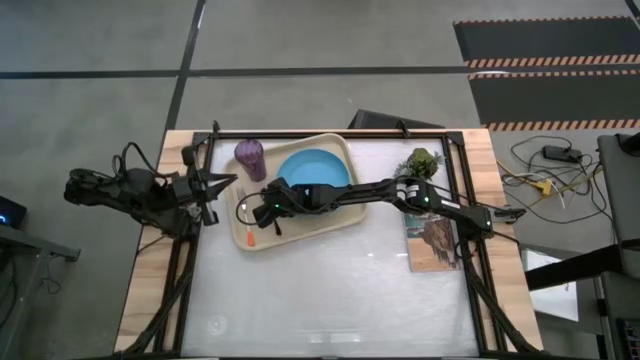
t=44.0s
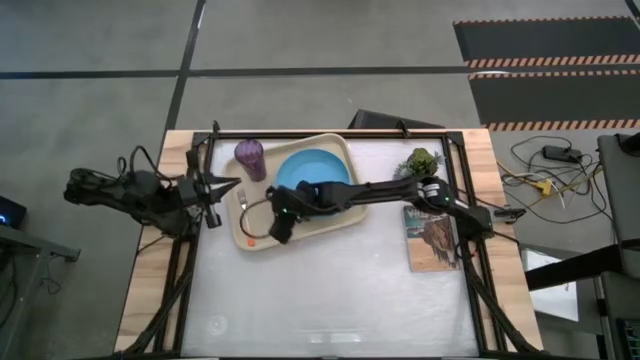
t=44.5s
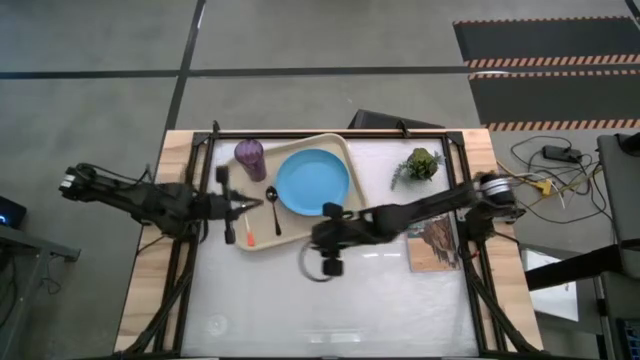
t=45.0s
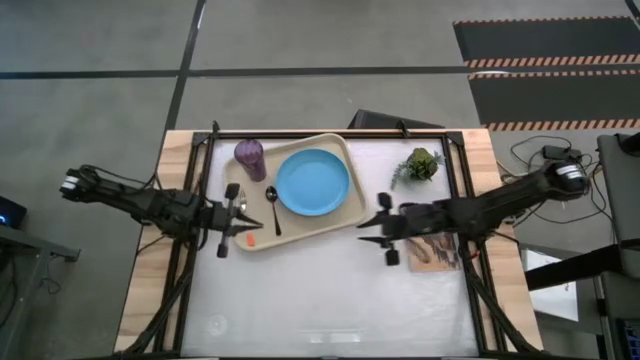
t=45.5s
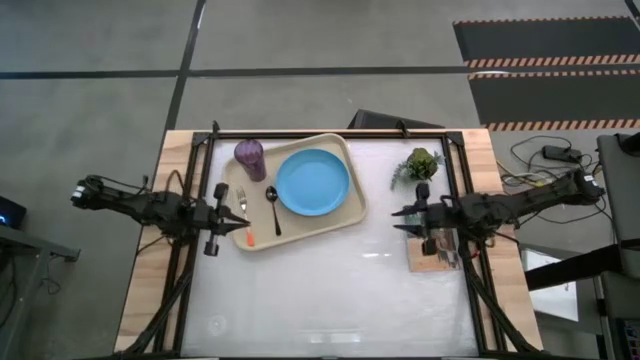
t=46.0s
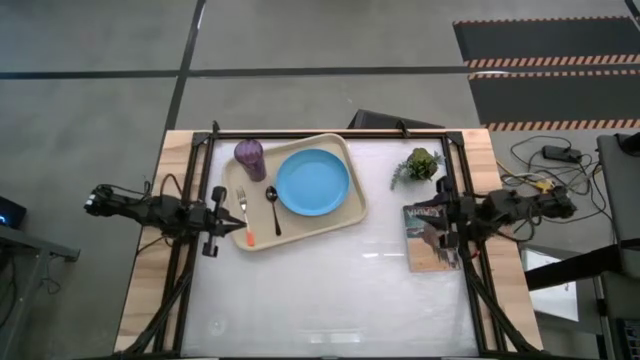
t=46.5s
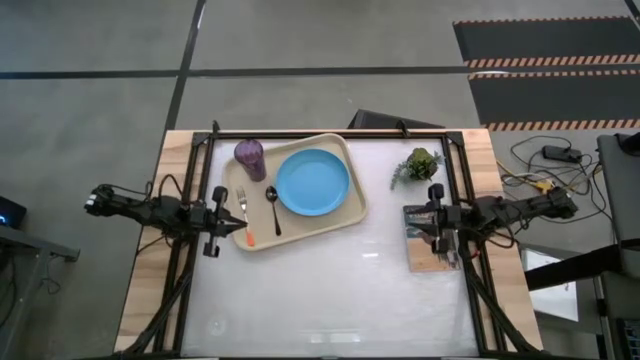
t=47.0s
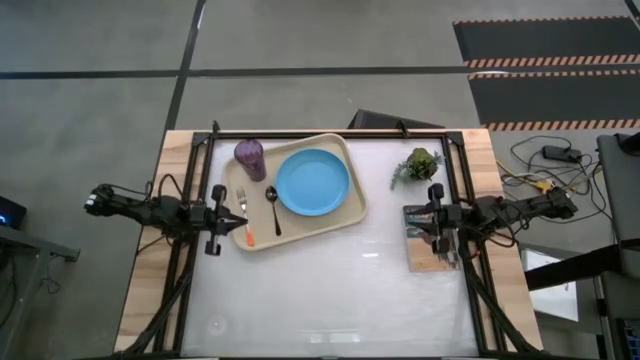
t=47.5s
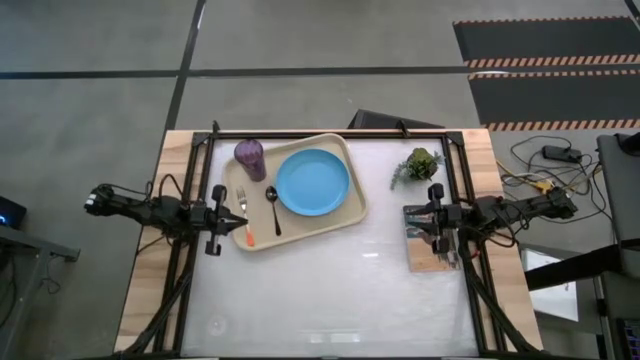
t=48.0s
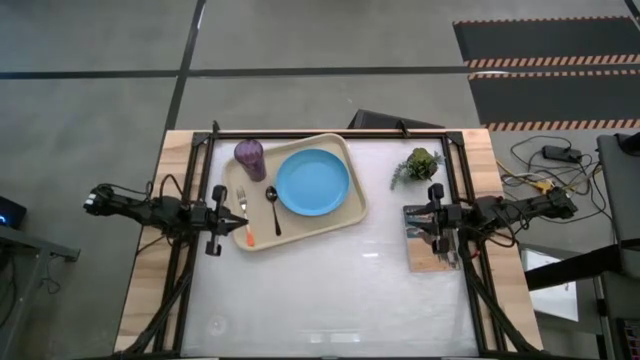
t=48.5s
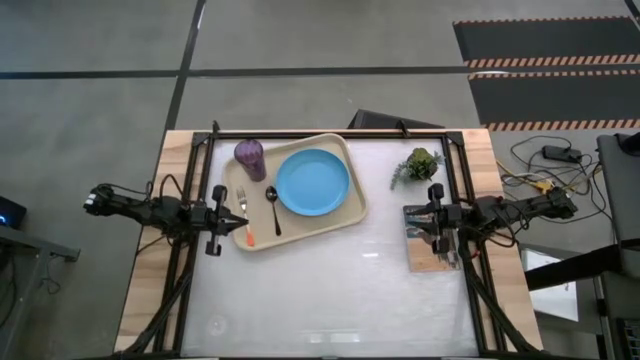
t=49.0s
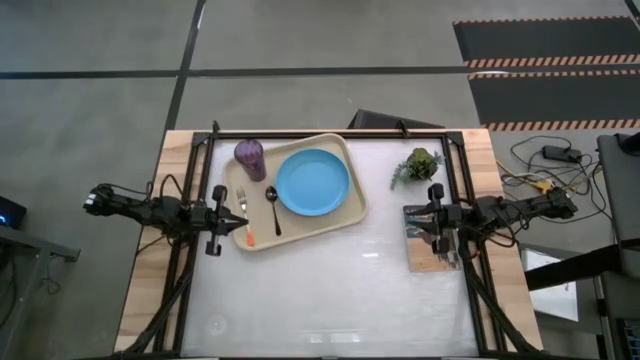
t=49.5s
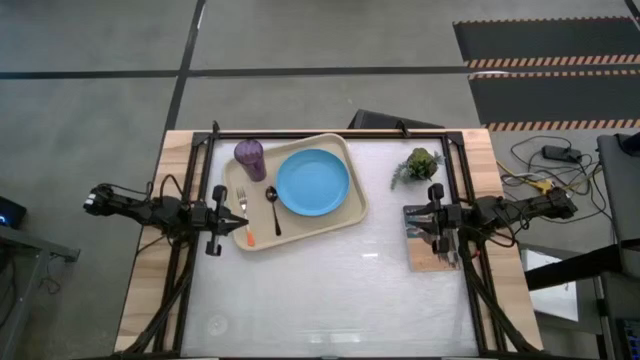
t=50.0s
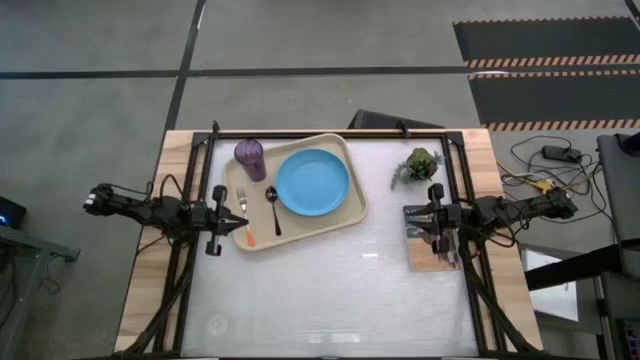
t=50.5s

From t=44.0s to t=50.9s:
Task: Pick and place plate/cup/fork/spoon on tray
Return to Home Position

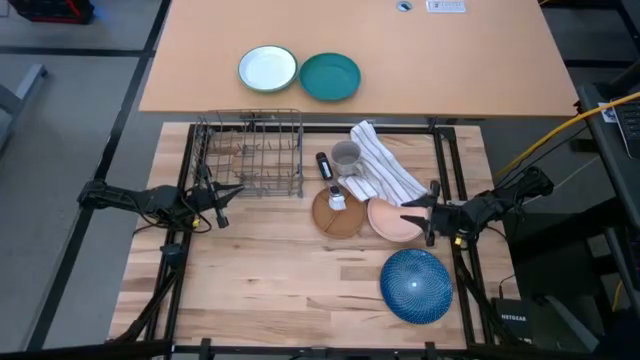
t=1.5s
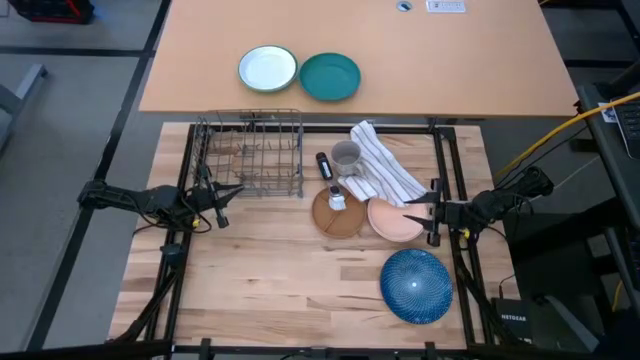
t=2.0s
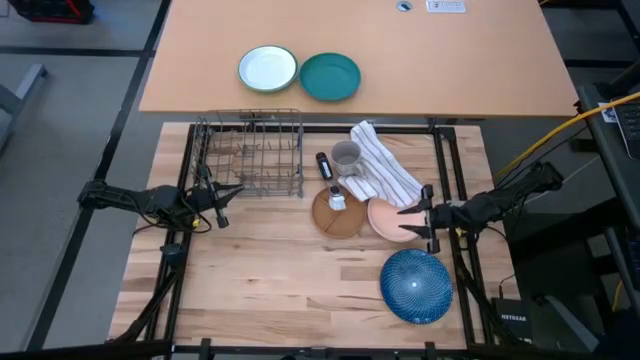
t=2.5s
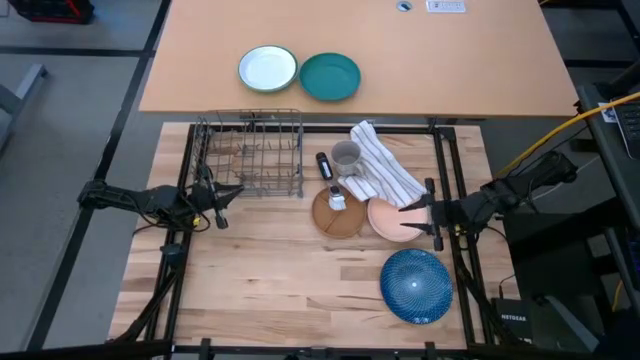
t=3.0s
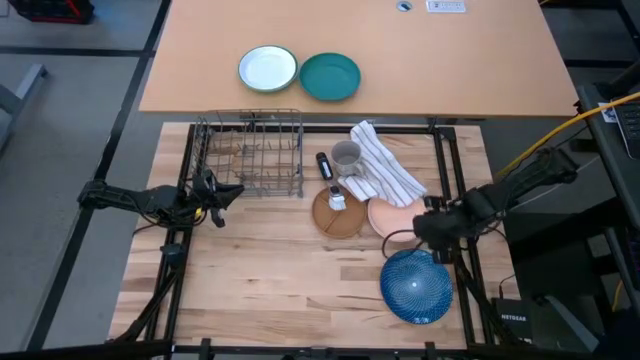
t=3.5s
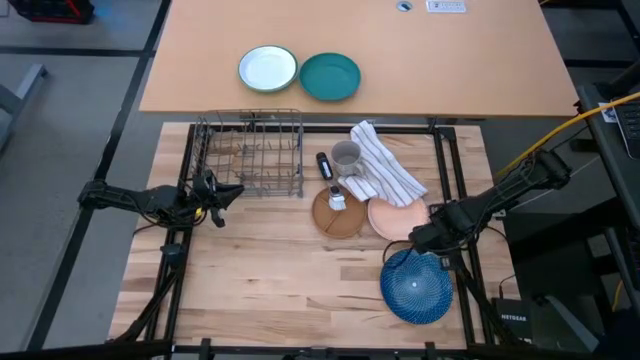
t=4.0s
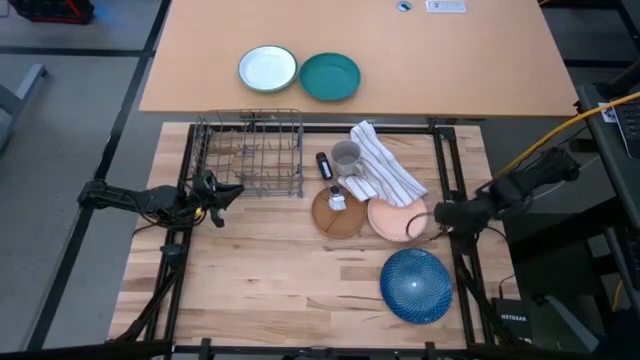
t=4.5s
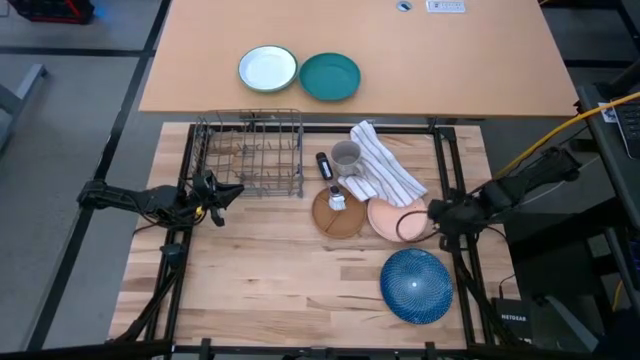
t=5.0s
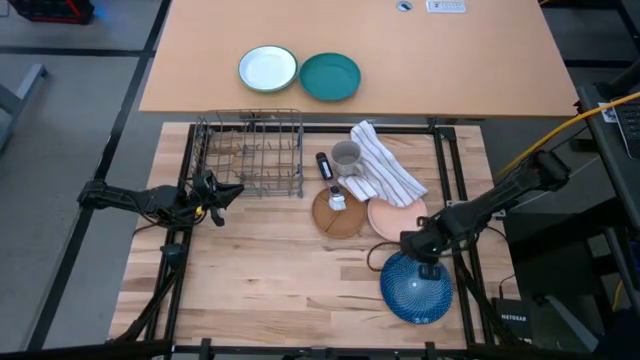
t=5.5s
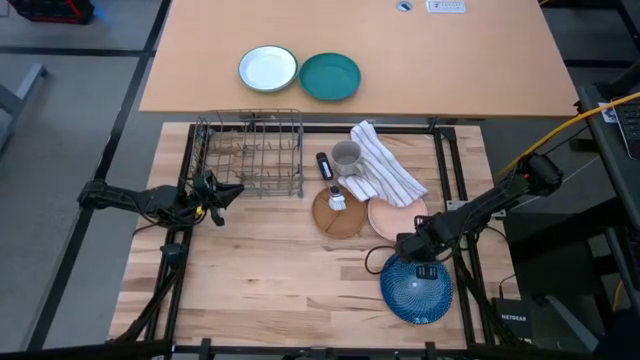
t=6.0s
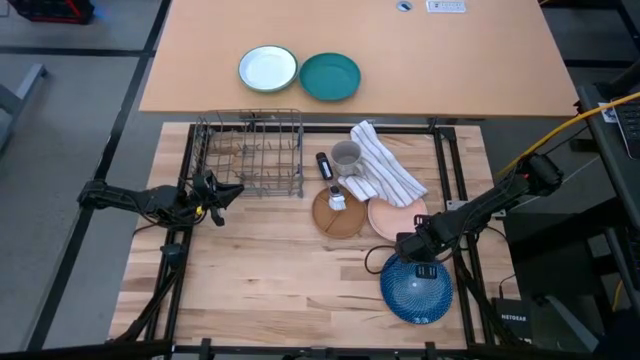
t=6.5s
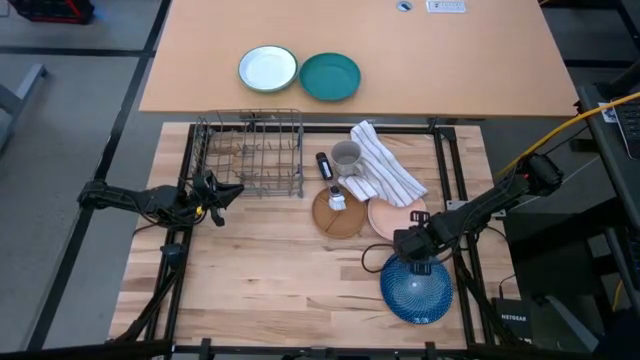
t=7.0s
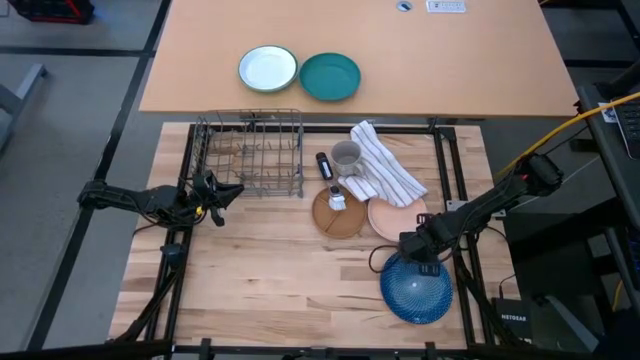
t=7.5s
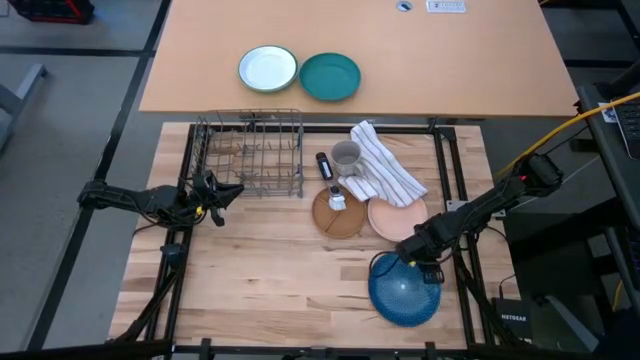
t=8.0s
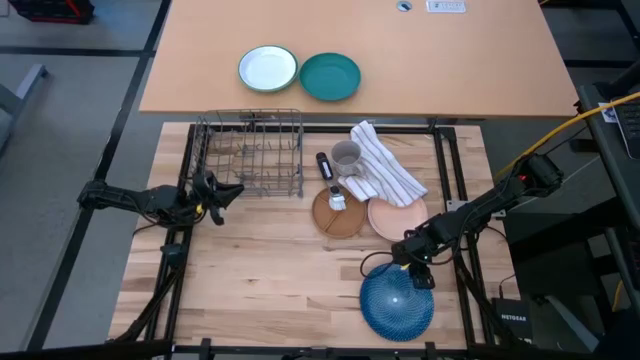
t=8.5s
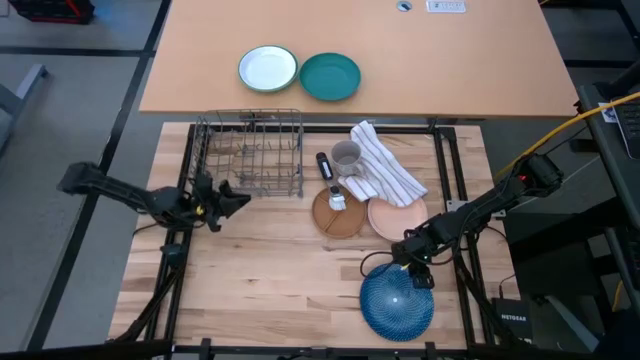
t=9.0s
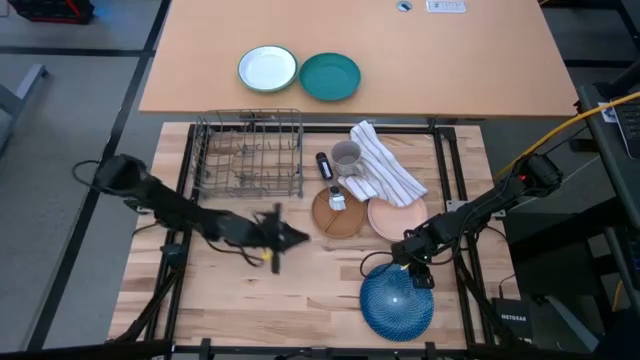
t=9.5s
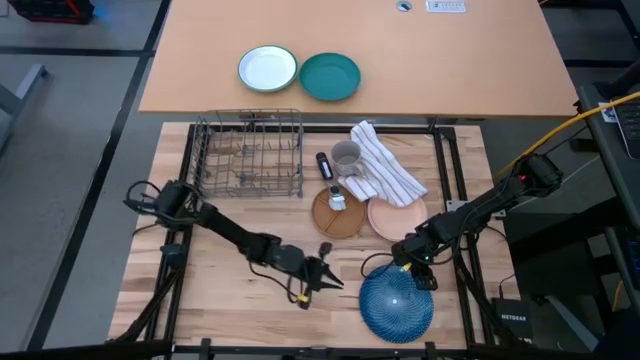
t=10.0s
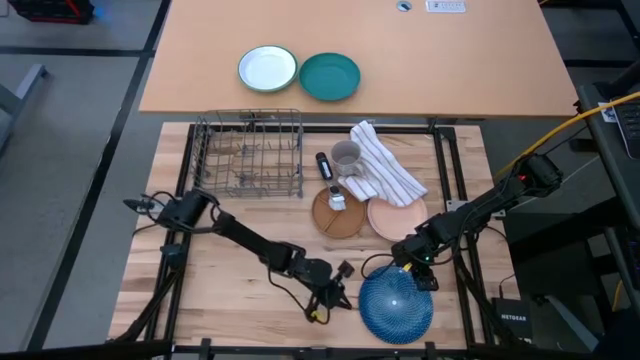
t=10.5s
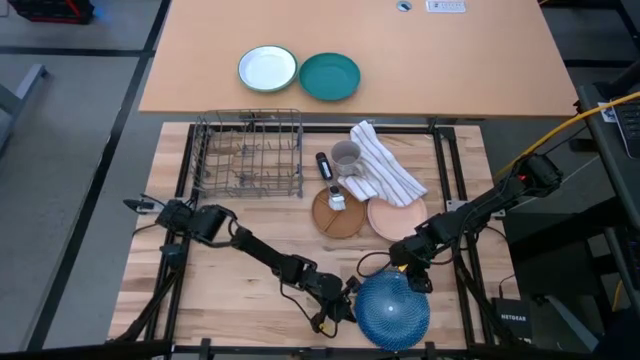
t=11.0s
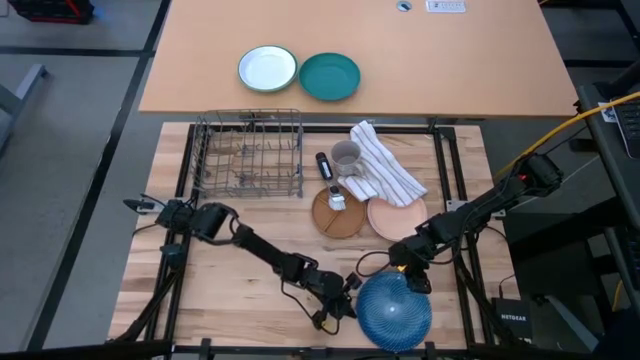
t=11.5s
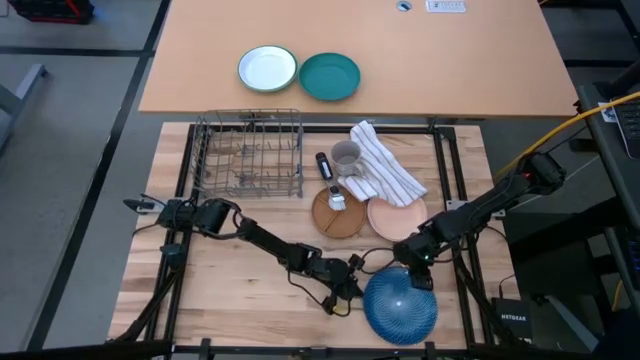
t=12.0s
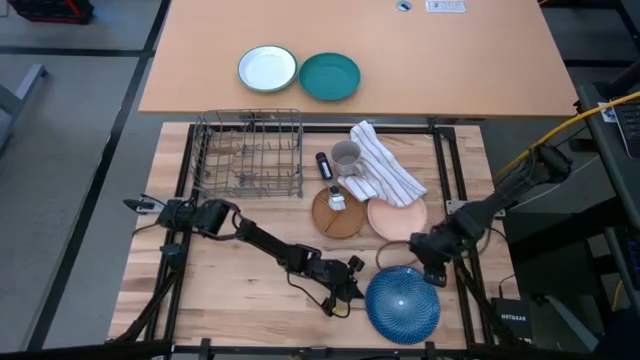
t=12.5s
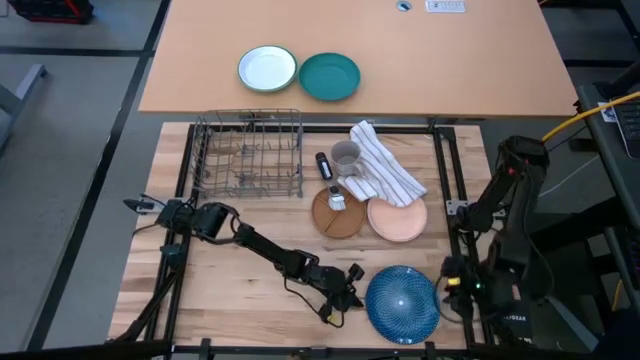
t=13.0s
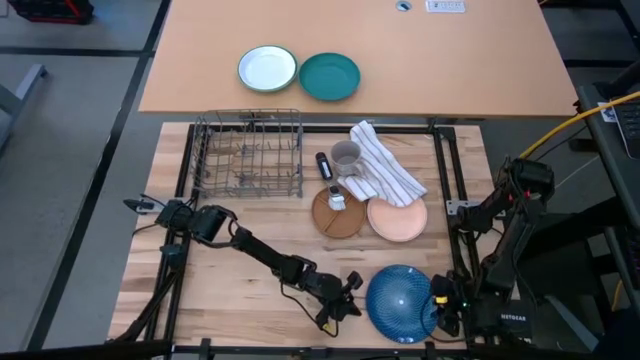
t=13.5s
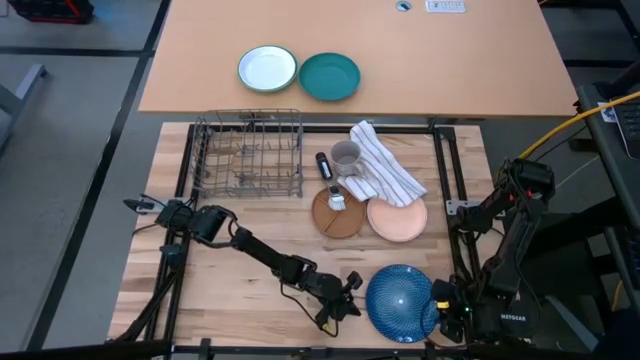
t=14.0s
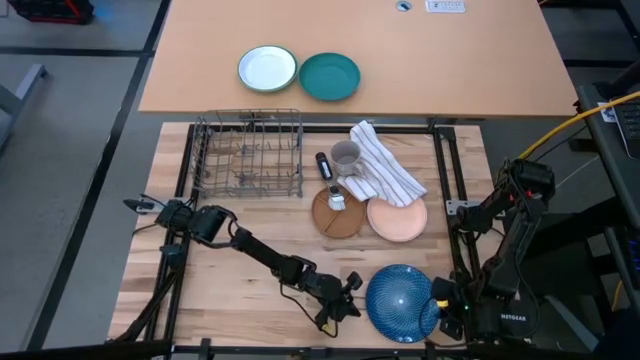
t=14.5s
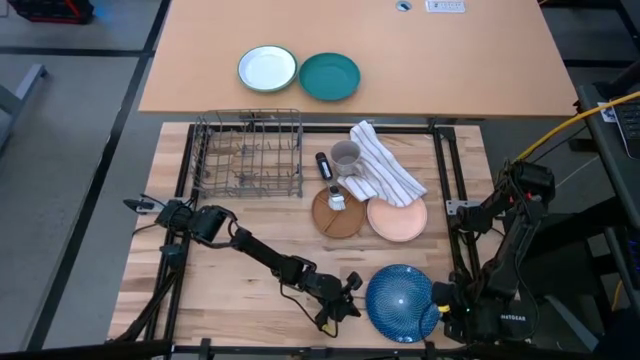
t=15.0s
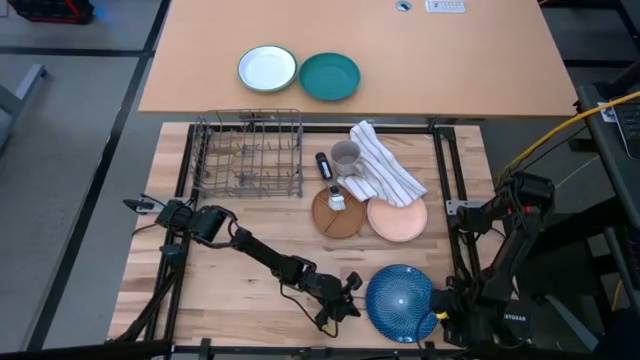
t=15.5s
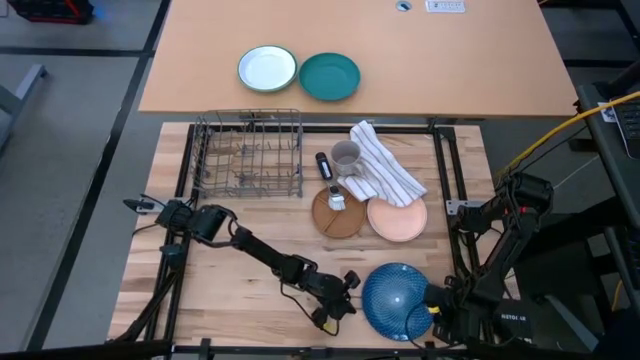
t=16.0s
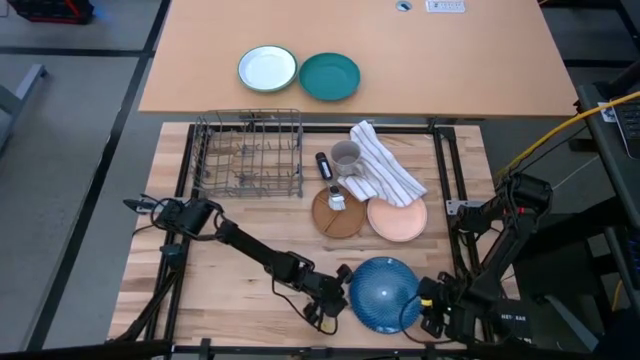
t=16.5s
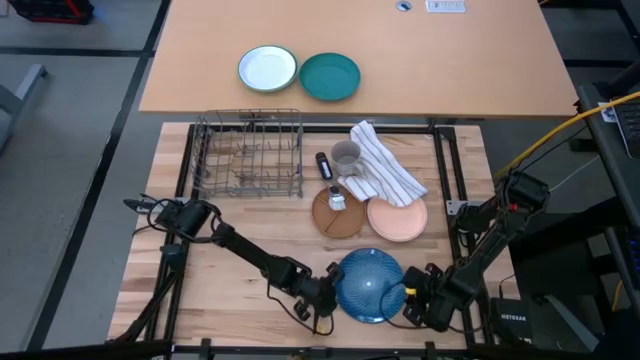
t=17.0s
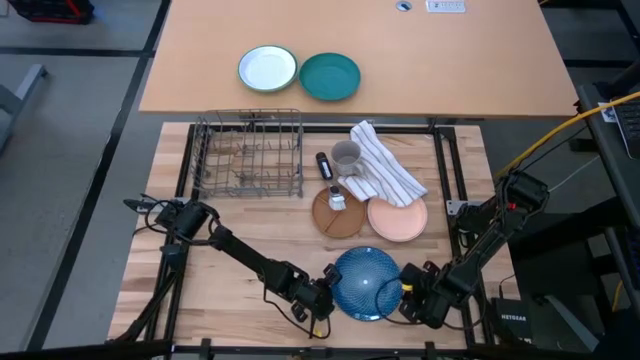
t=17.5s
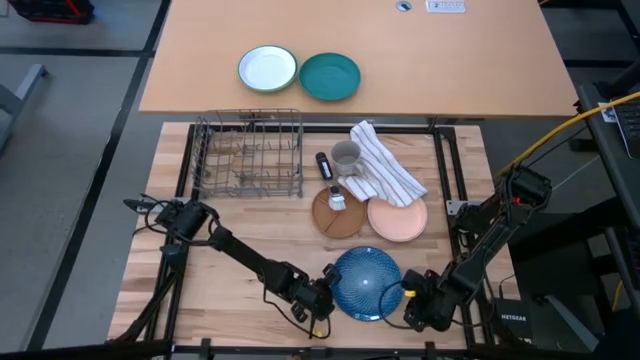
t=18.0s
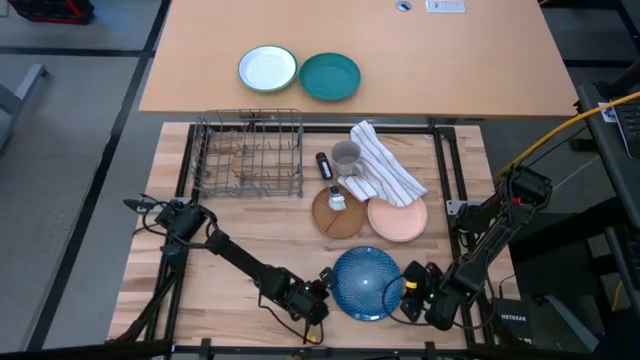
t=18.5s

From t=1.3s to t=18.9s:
Task: Sort dishes
Put the blue plate into the dish rack
